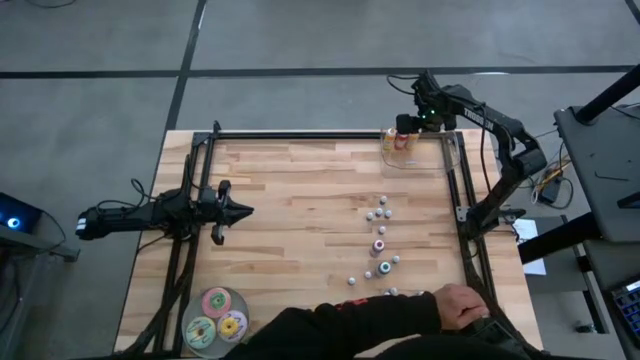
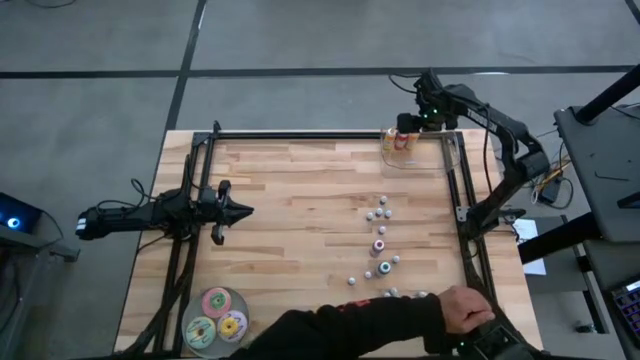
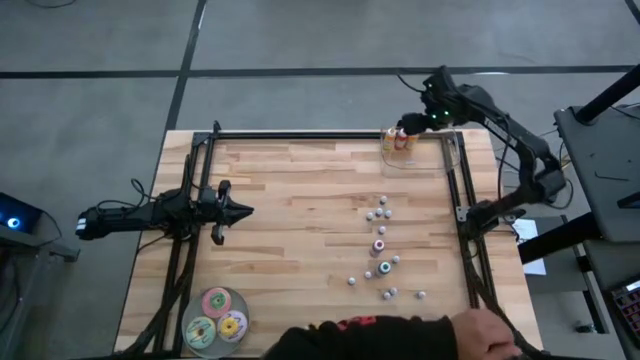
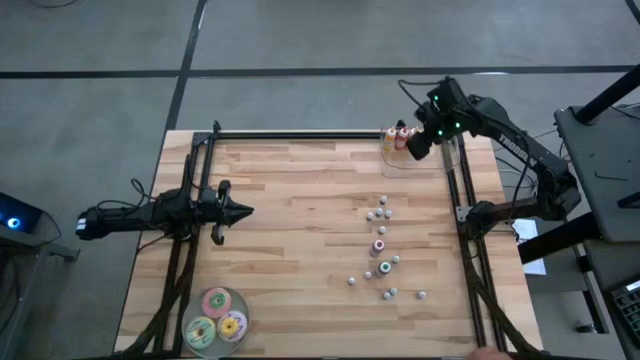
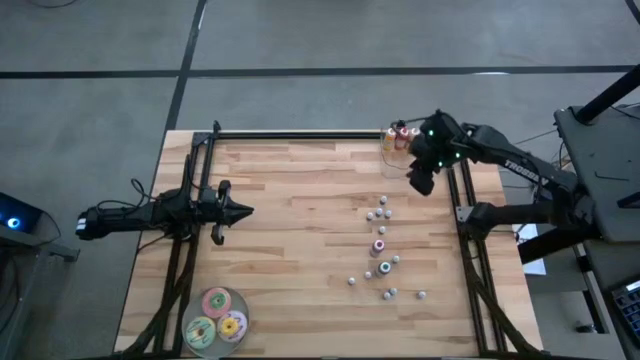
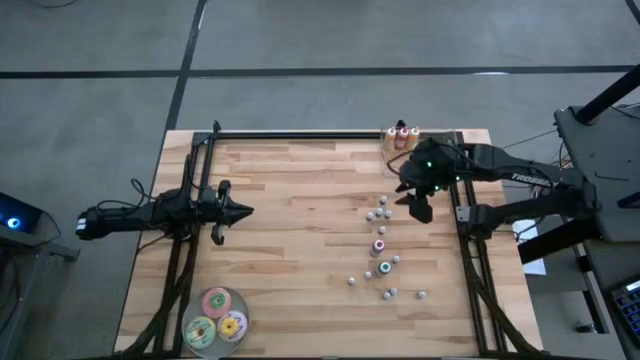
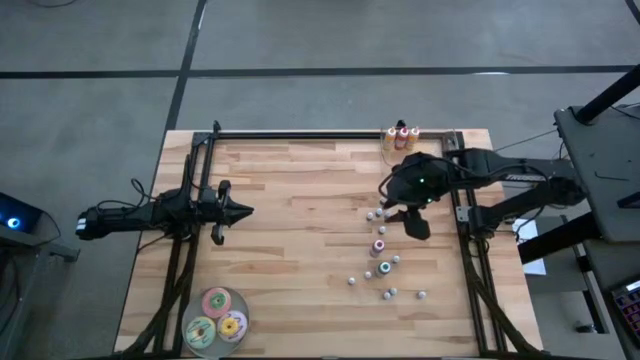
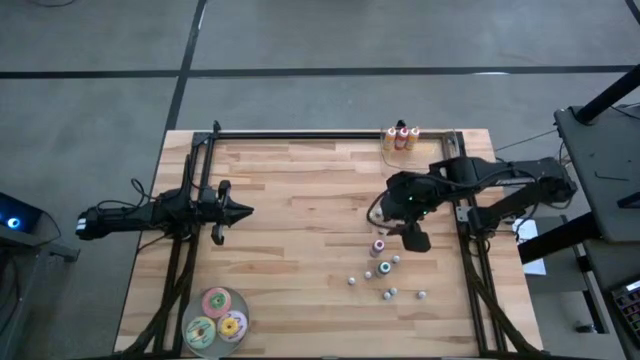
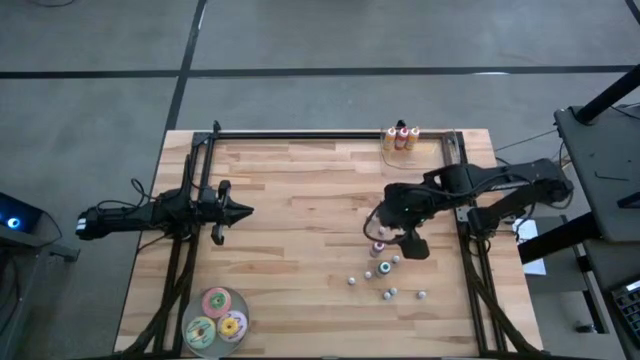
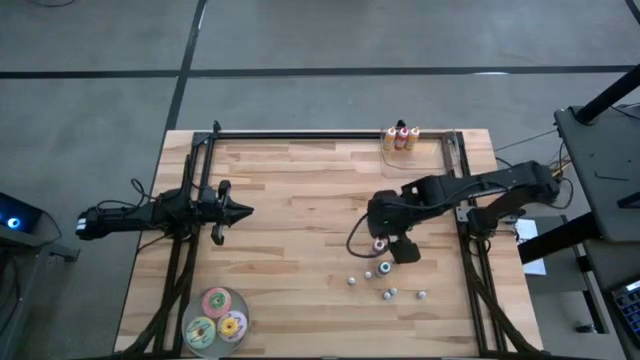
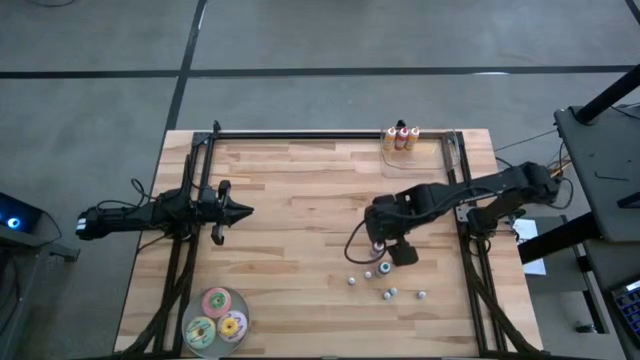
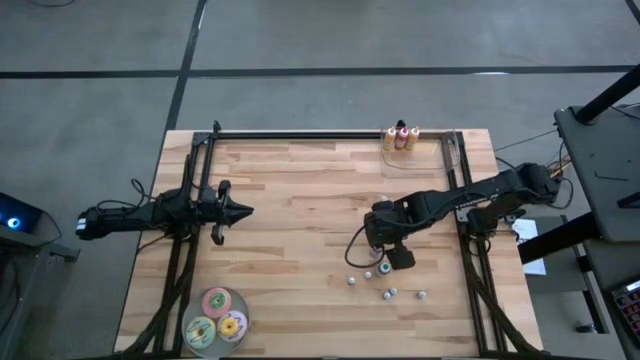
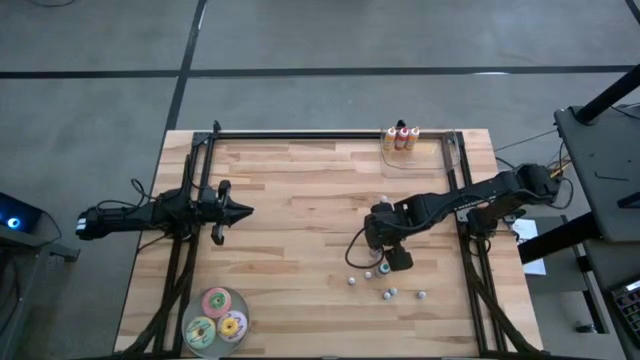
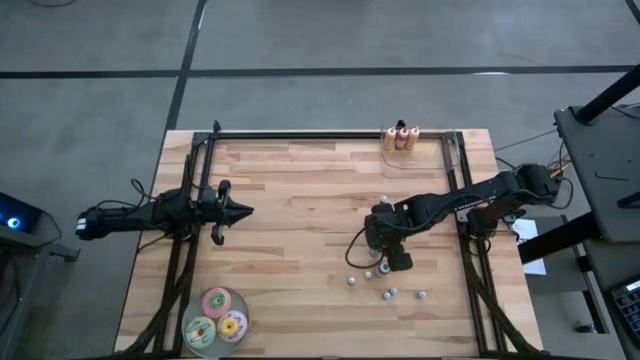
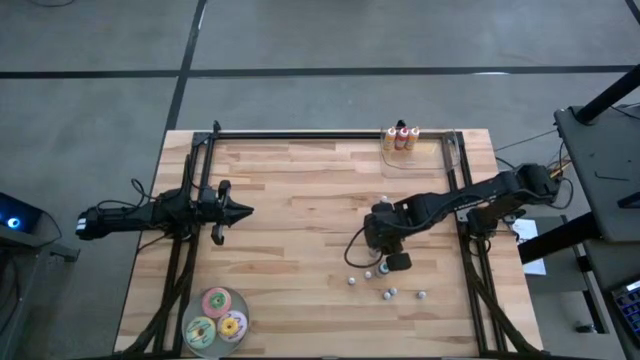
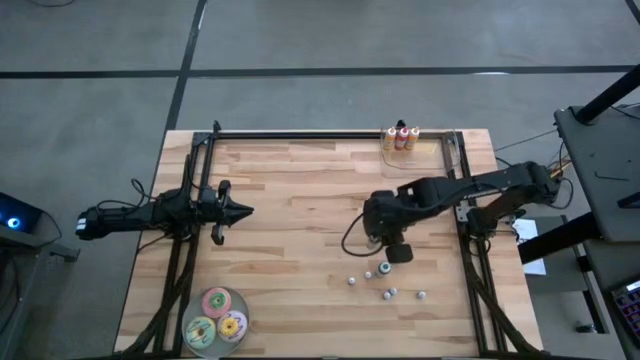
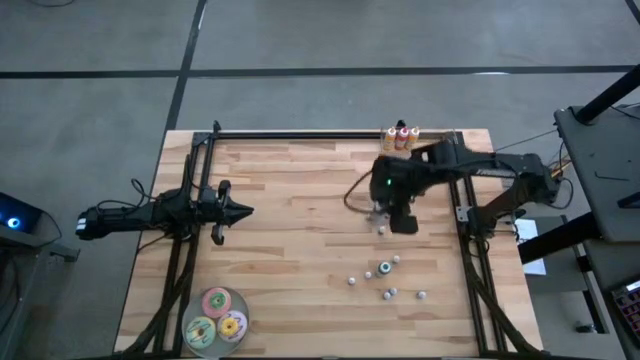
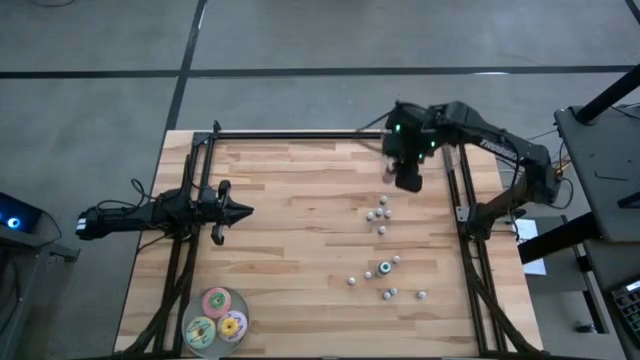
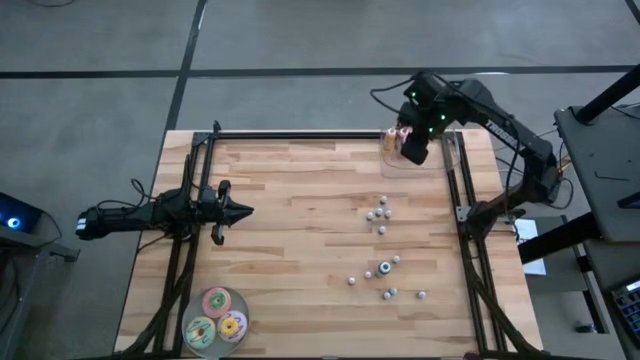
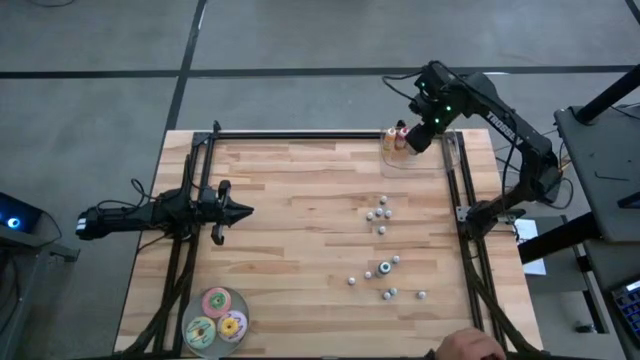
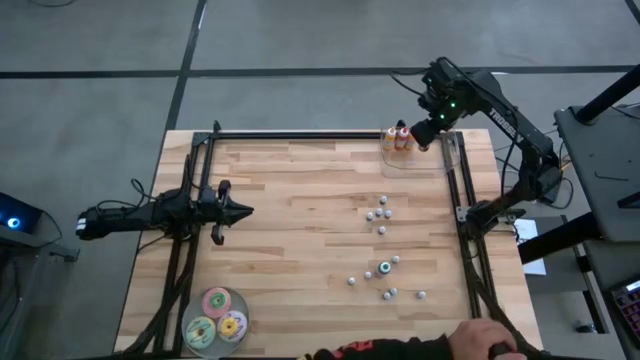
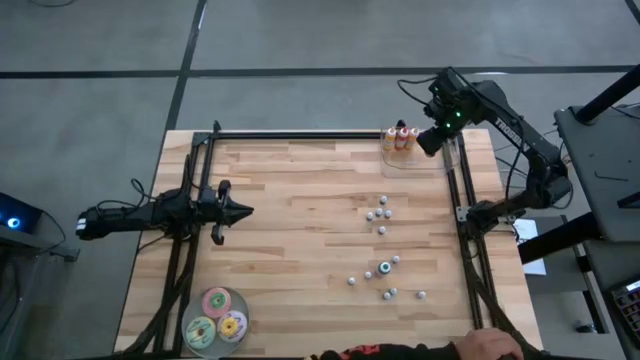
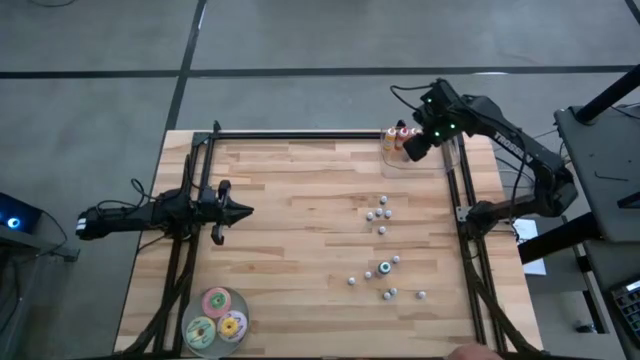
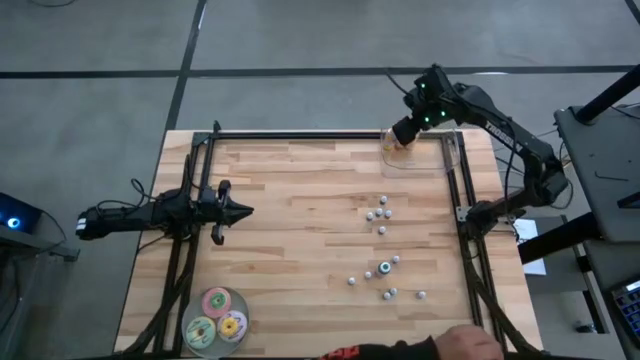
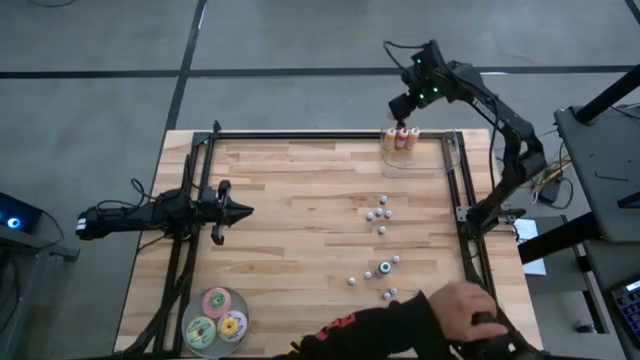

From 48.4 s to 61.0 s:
Task: Pick & Place food coloring
Put the big red food coloring bottle into the bin

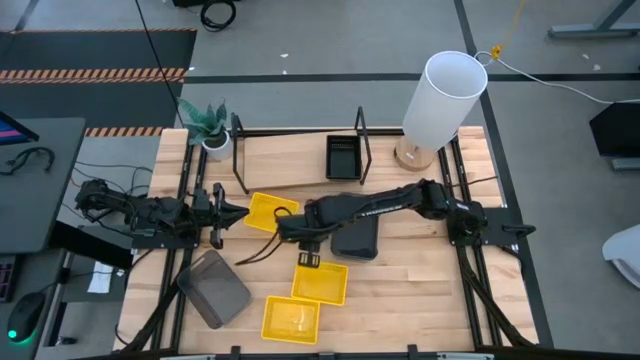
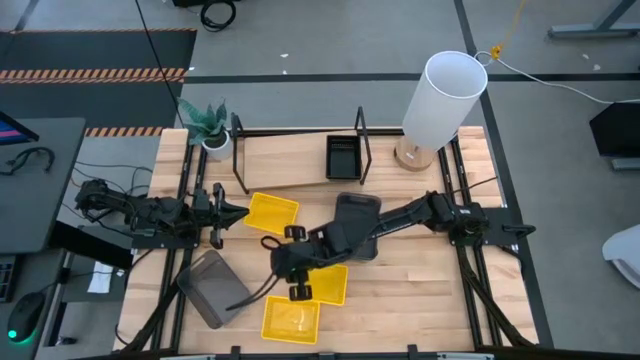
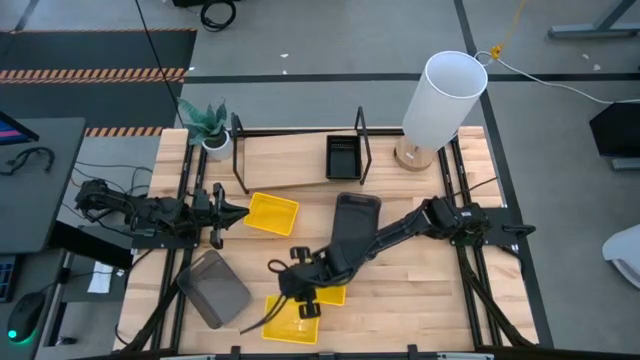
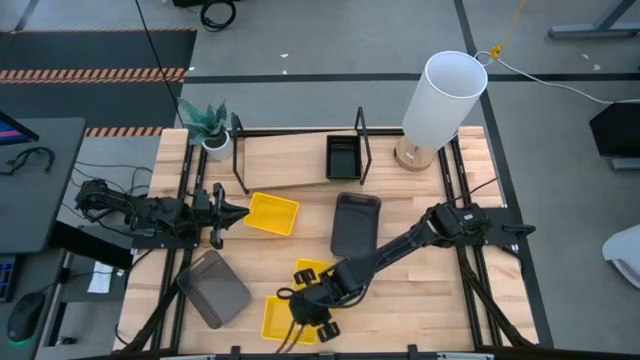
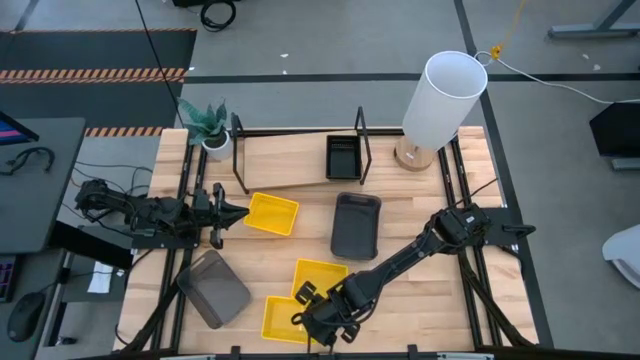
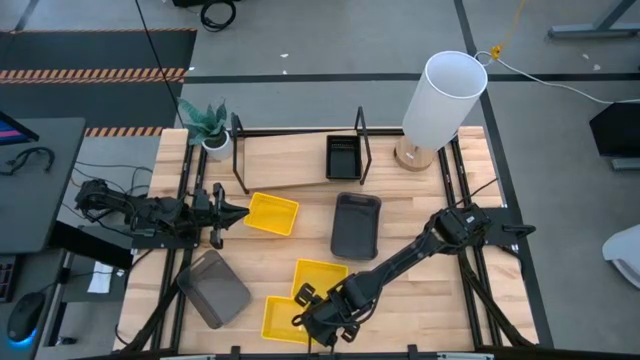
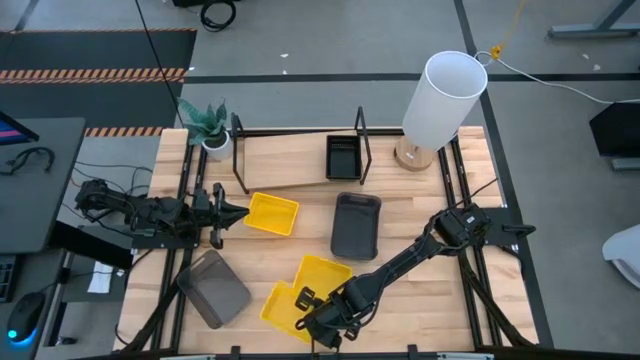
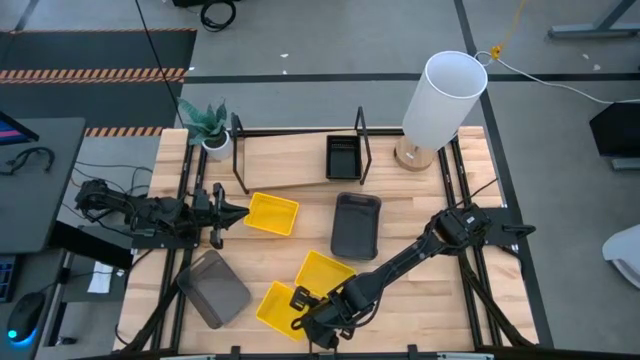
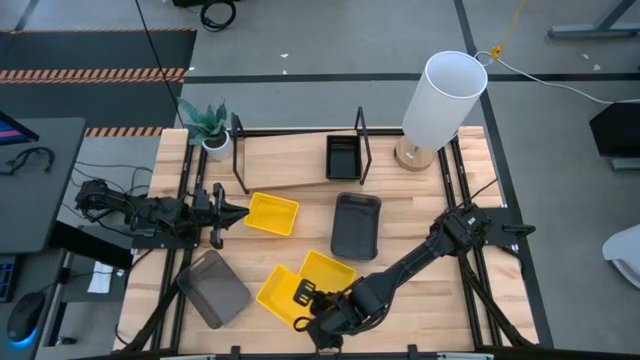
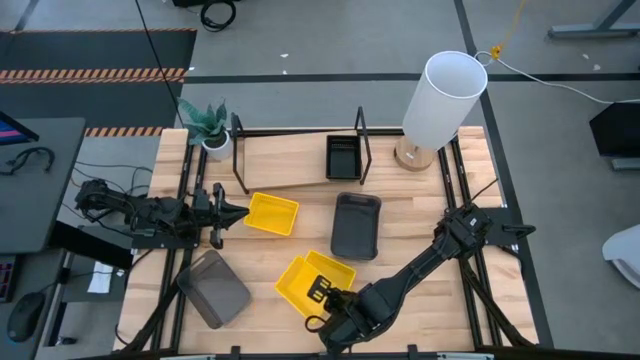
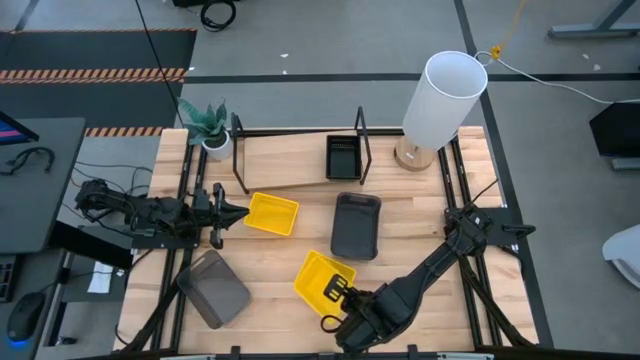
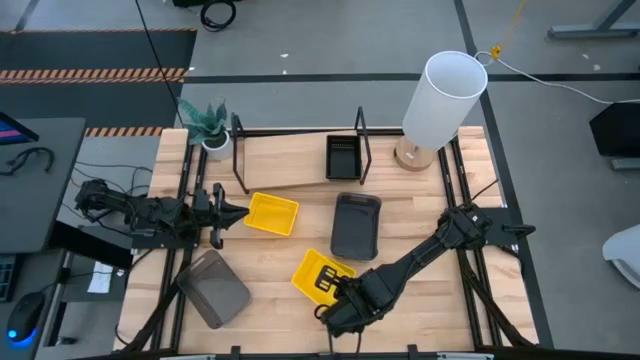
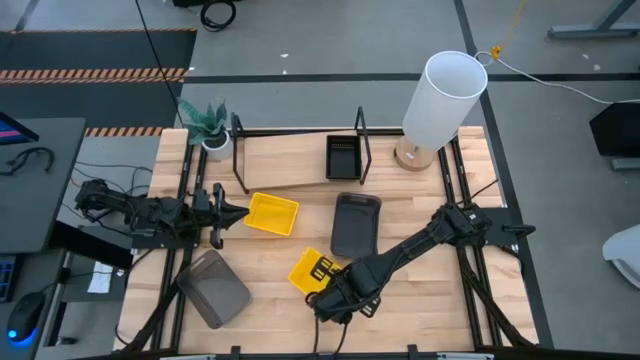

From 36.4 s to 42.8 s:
Task: Stack baskets on shelf by color
Stack the bottom yellow bin on the middle yellow bin

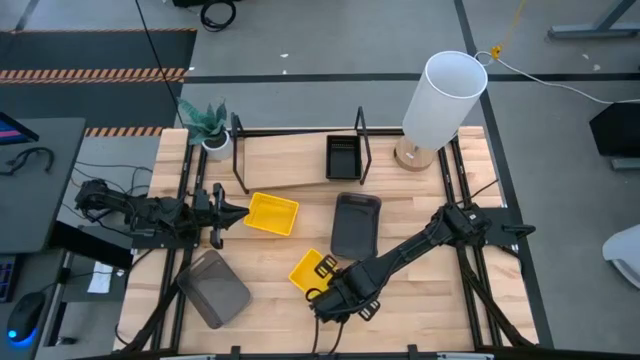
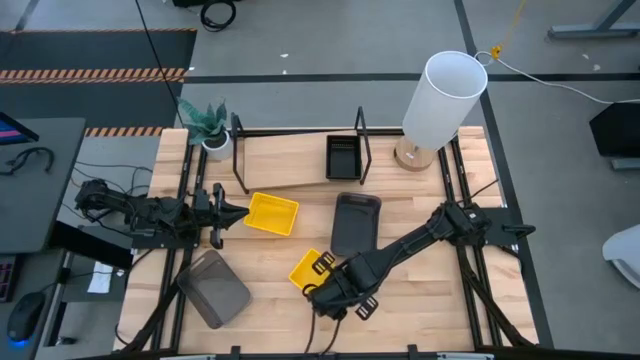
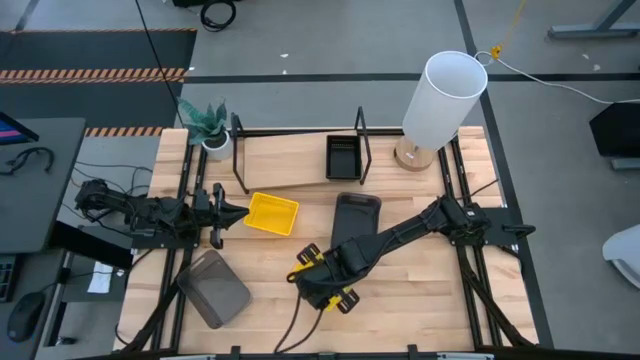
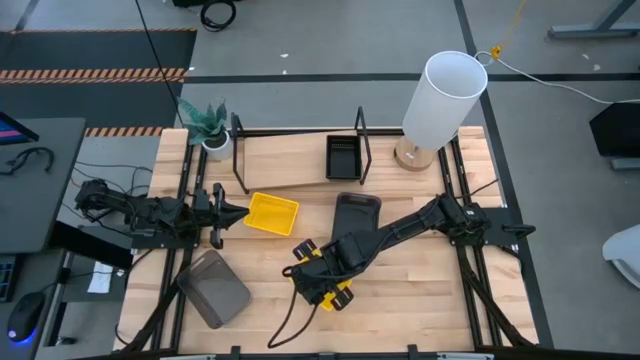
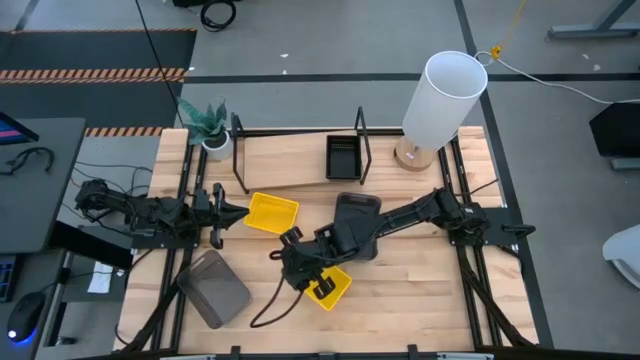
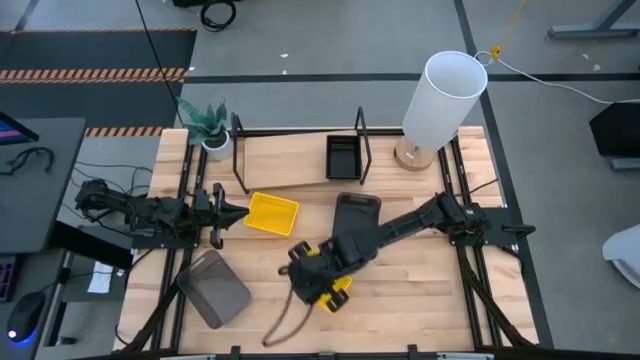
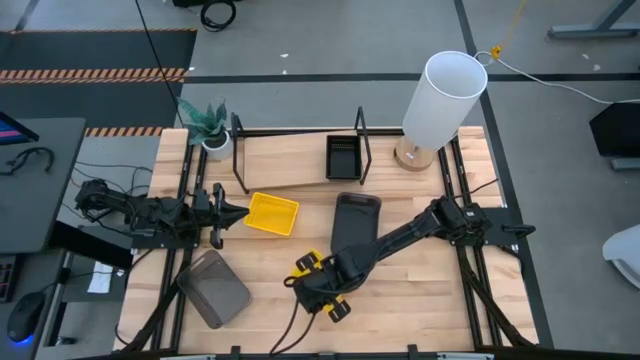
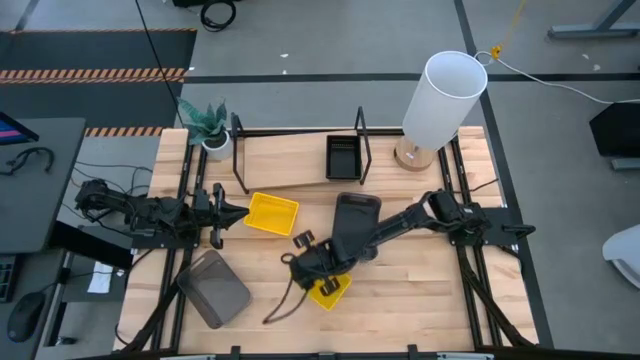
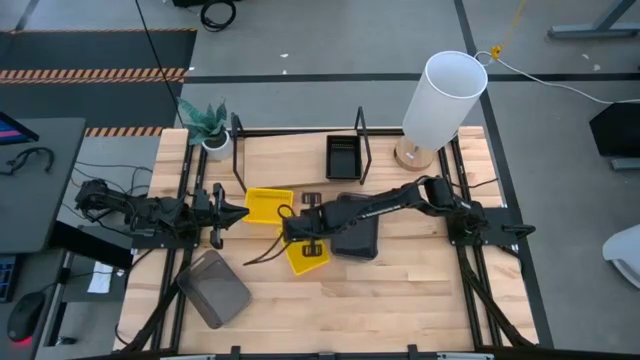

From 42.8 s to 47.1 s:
Adjust the stacked yellow bins on the table
